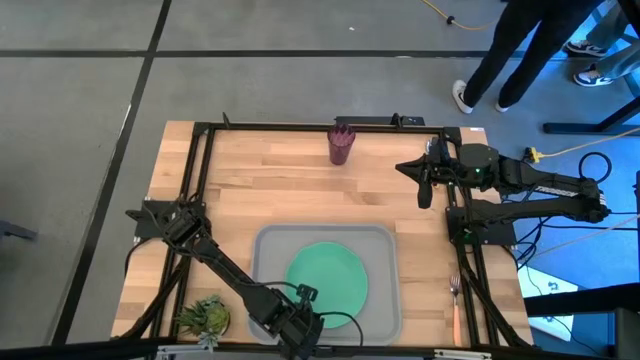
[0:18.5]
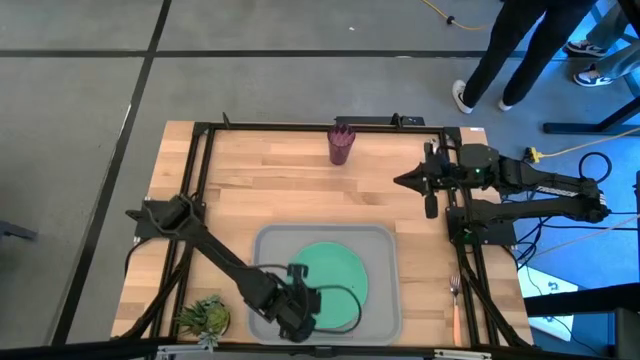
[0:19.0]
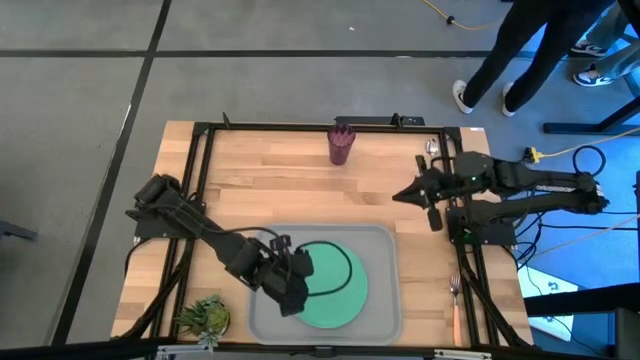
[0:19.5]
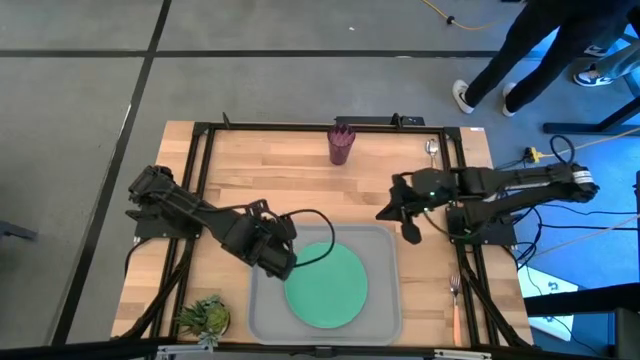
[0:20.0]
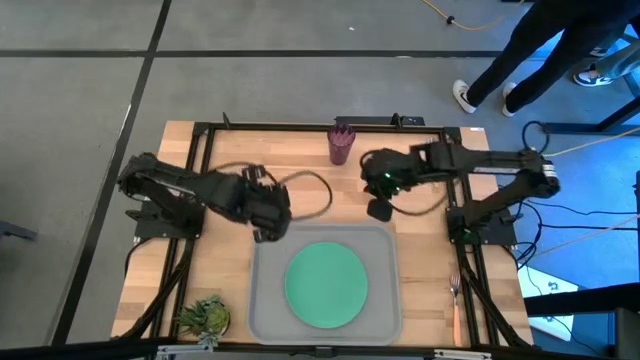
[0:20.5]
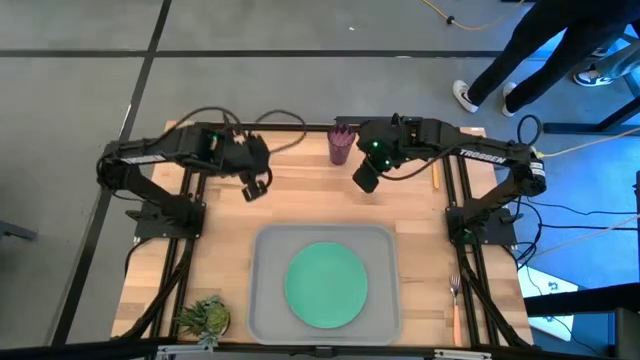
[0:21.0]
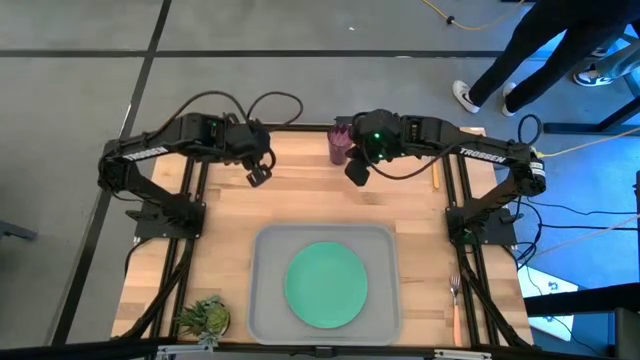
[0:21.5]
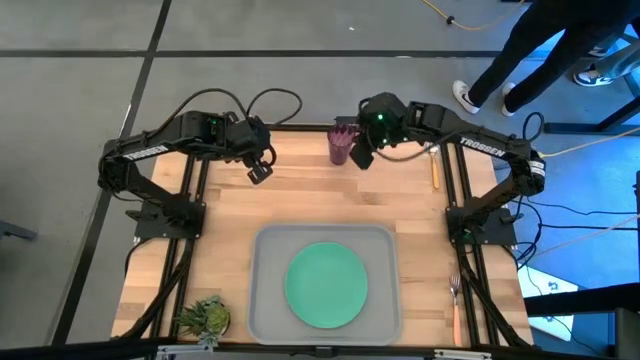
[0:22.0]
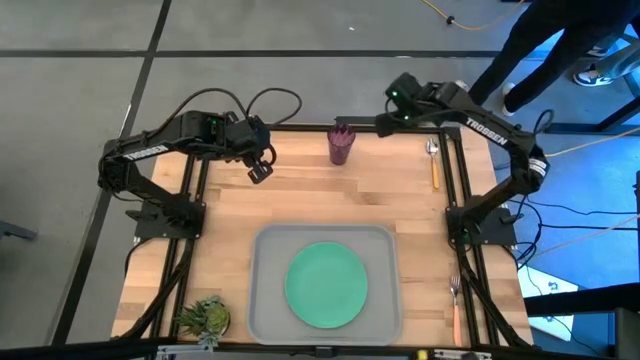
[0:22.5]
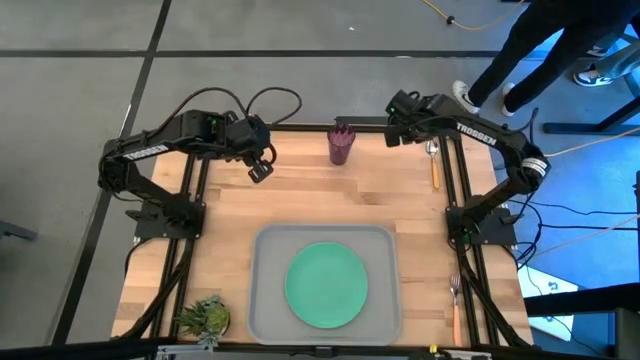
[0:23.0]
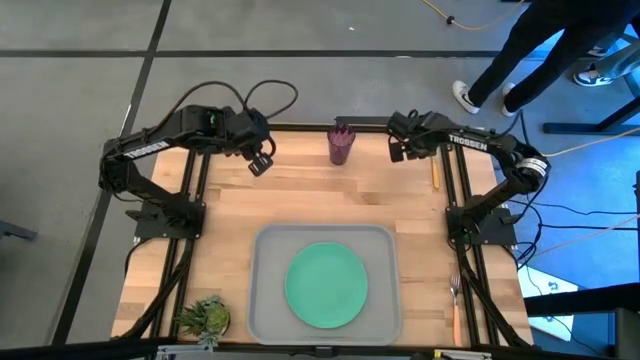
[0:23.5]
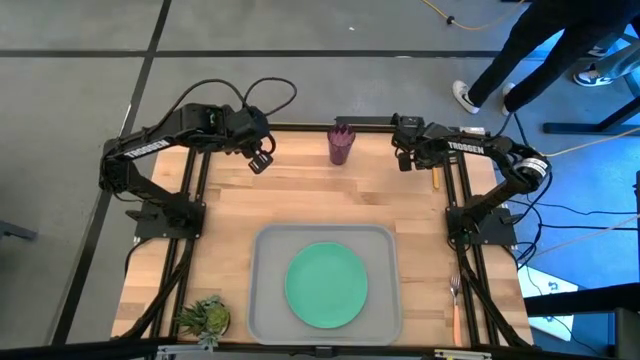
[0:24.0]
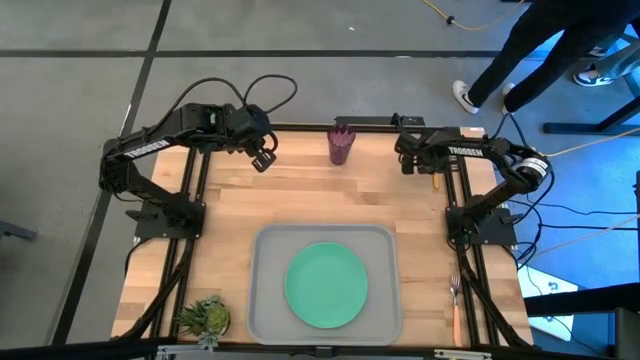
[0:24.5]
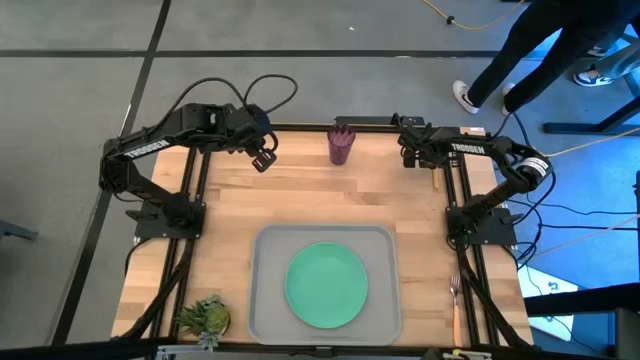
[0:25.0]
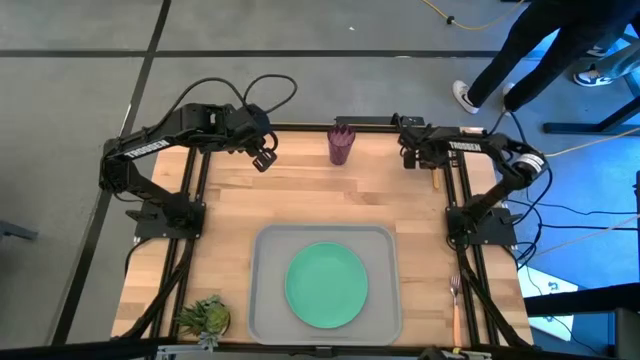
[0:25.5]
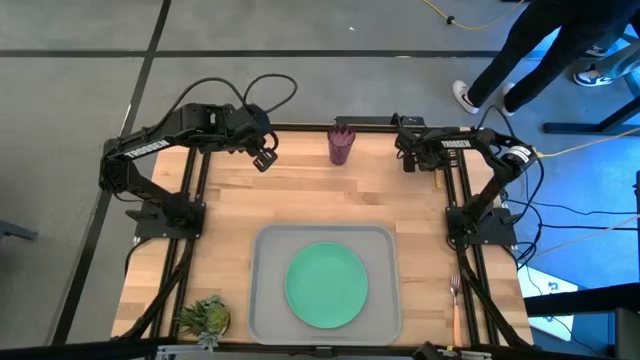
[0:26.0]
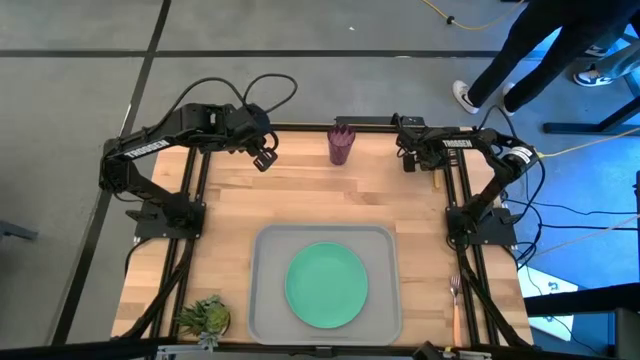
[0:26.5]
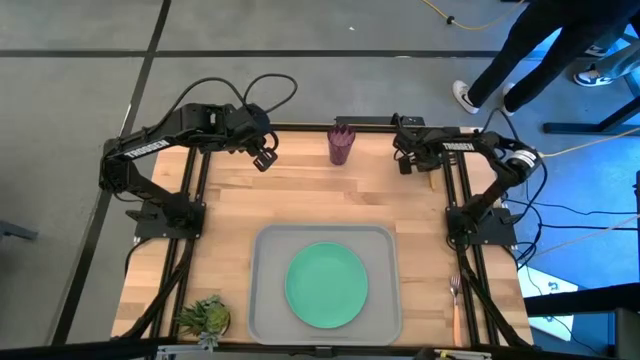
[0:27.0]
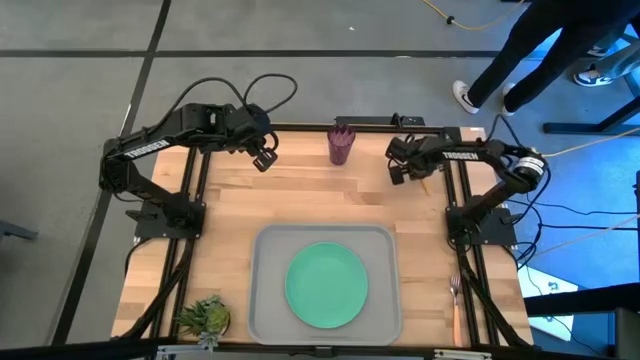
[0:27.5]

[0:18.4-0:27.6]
Task: Pick and place plate/cup/fork/spoon on tray
Put the orange spoon on the gray tray to the right of the green plate

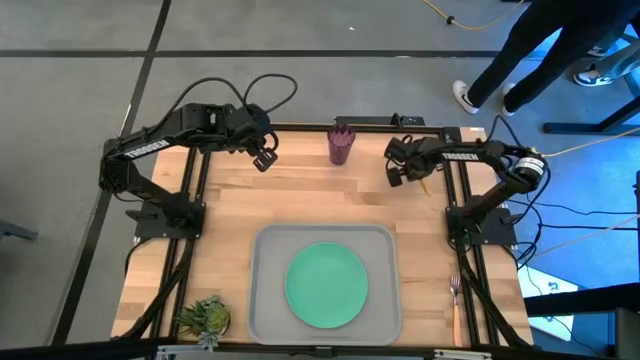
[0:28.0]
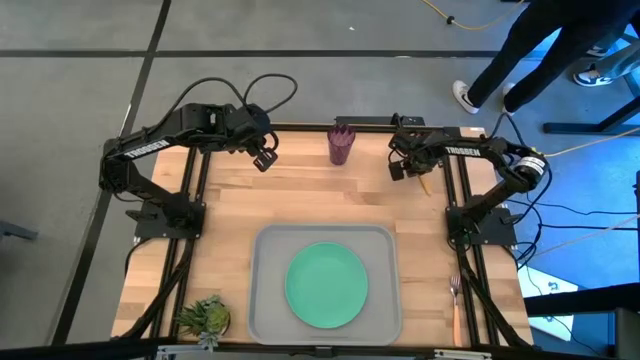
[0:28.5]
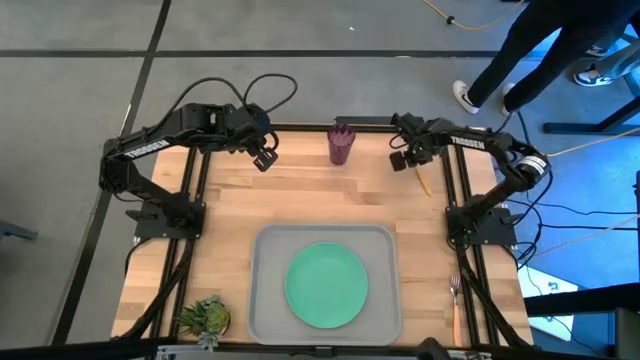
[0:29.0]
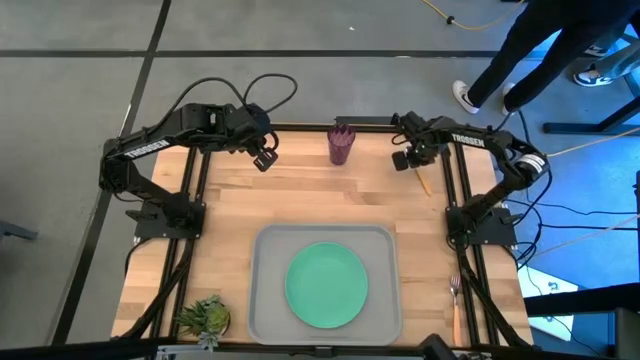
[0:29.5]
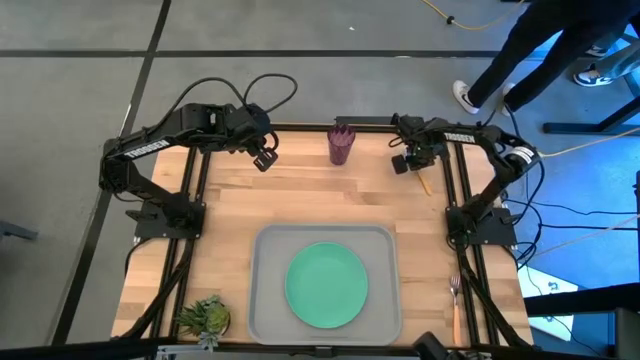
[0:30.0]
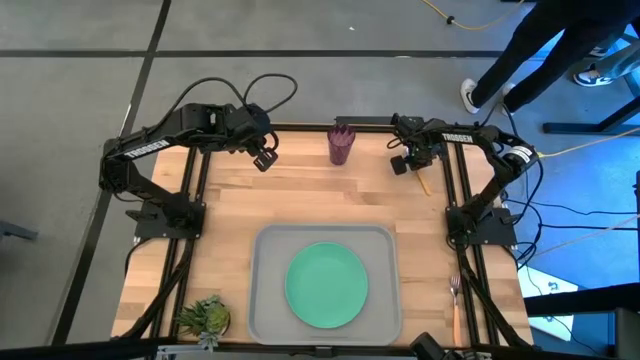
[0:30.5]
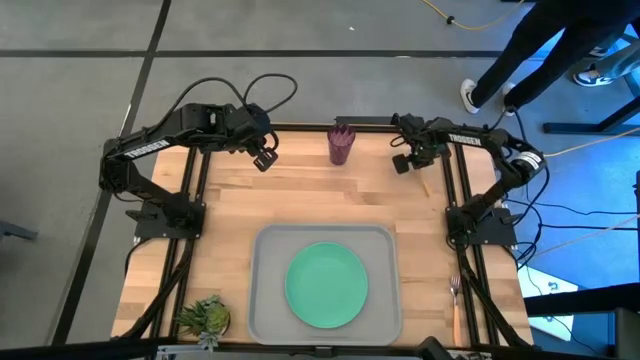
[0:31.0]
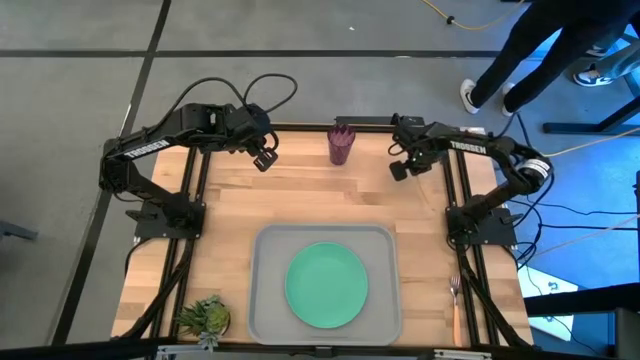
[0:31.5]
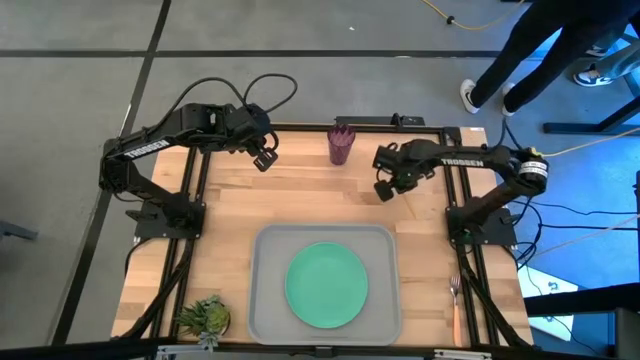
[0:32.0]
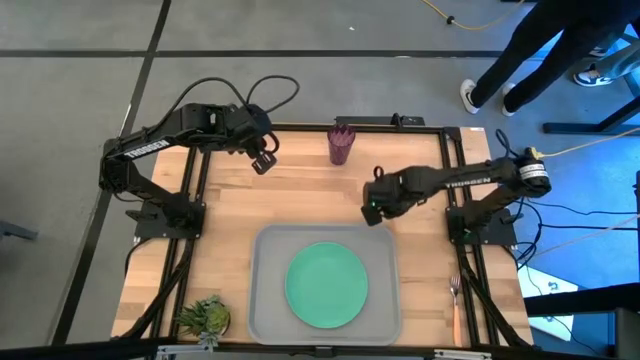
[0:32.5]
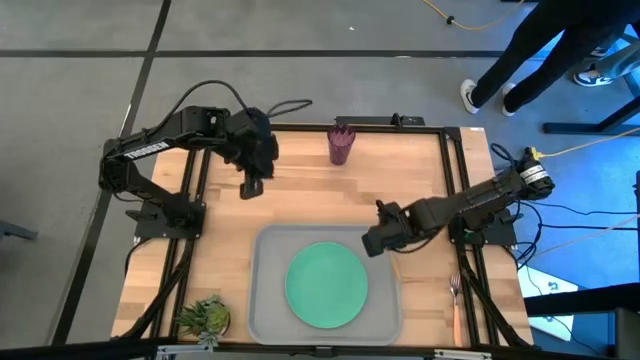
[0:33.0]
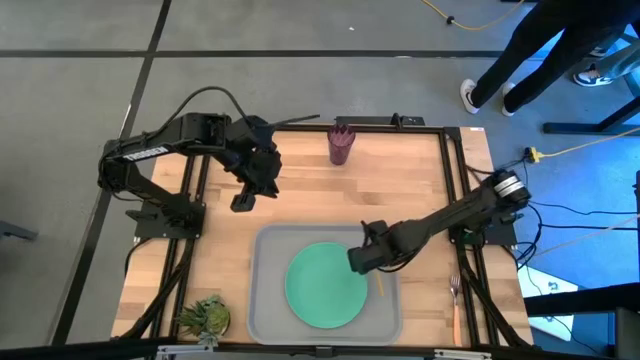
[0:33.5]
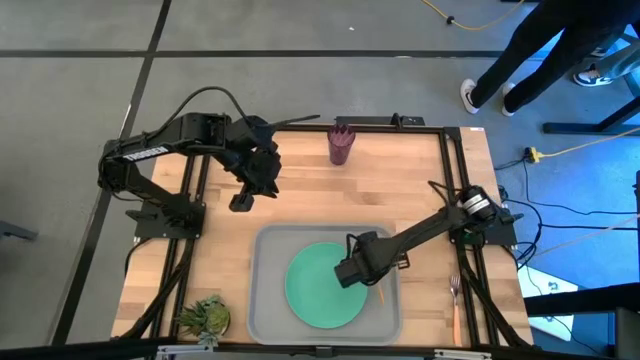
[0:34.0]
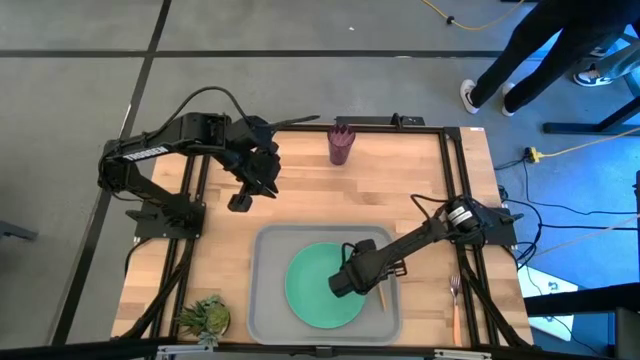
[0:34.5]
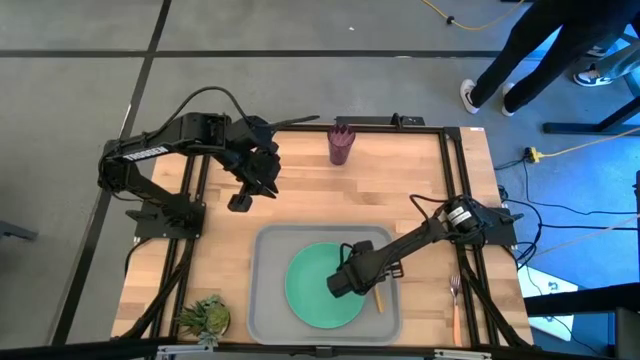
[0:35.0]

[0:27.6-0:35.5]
Put the orange spoon on the gray tray to the right of the green plate

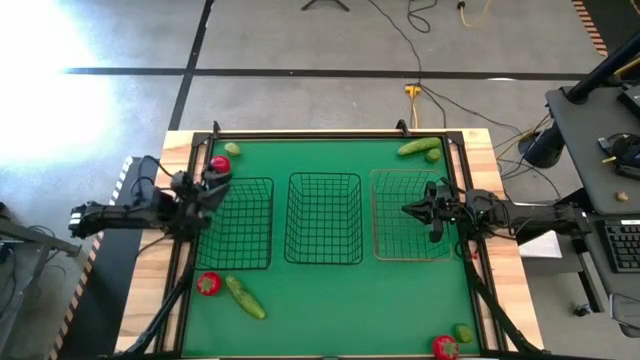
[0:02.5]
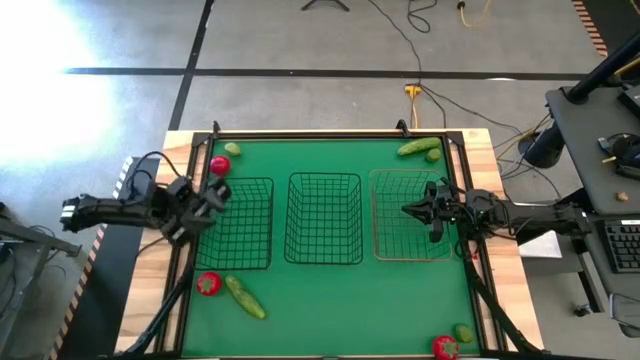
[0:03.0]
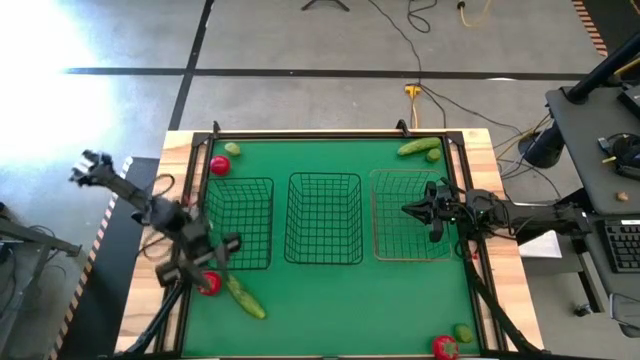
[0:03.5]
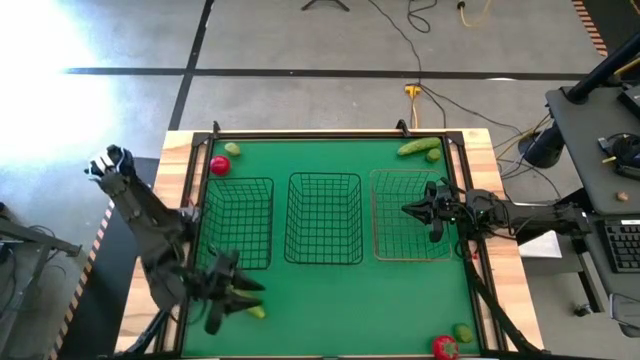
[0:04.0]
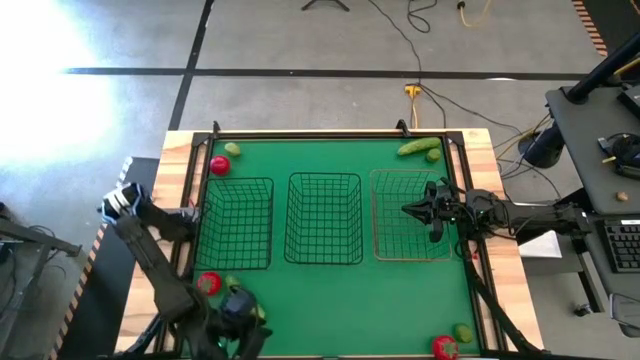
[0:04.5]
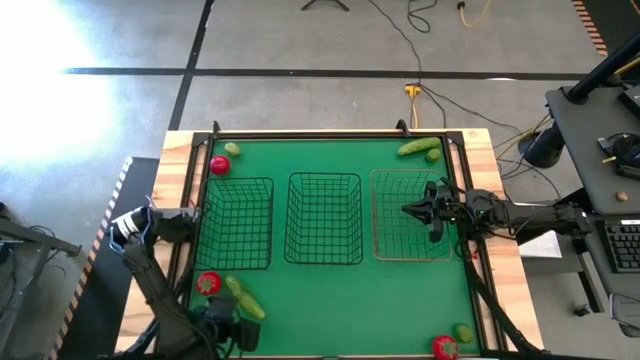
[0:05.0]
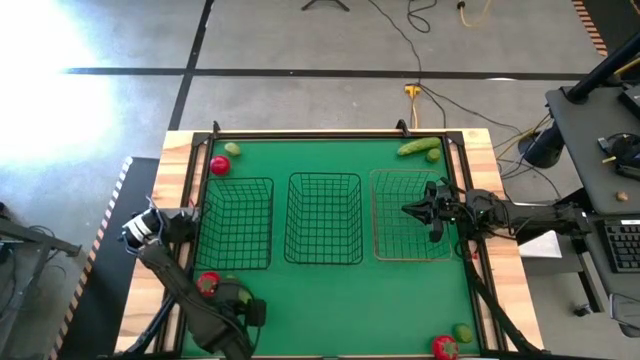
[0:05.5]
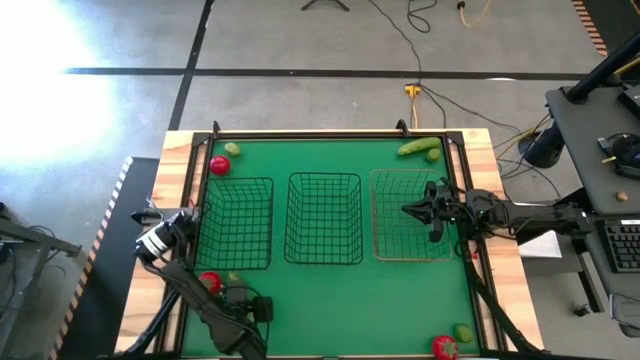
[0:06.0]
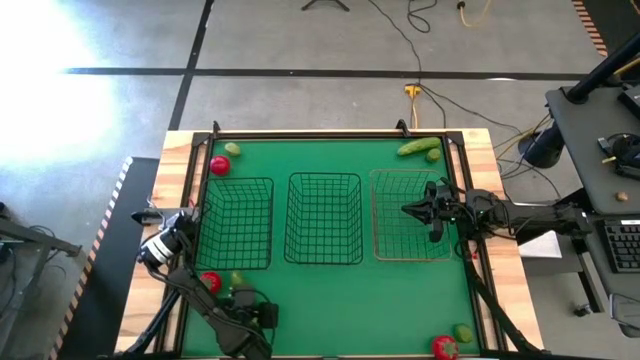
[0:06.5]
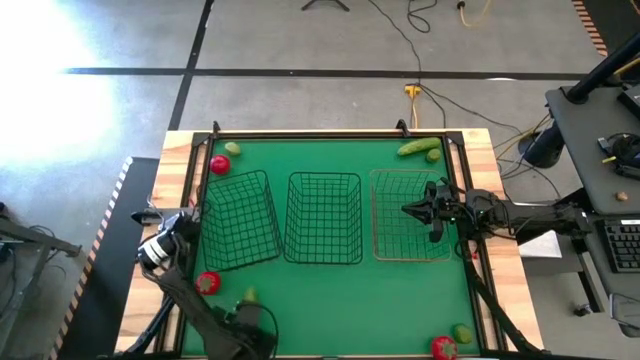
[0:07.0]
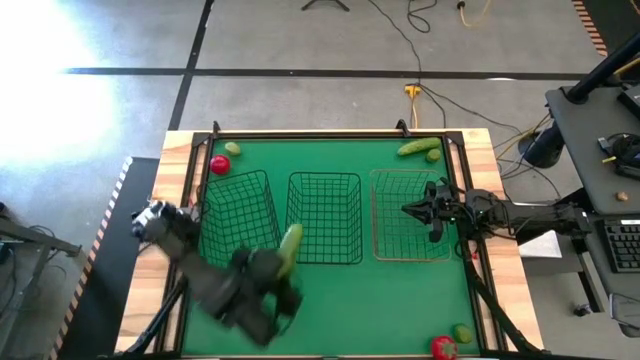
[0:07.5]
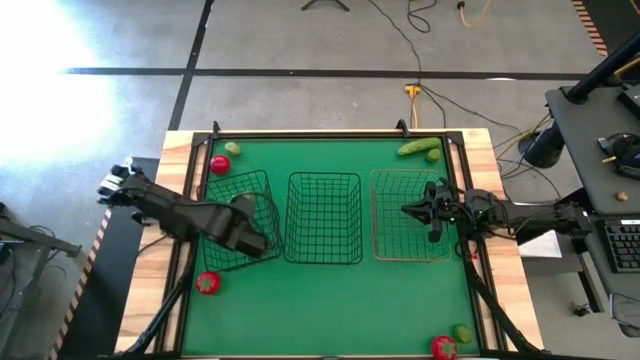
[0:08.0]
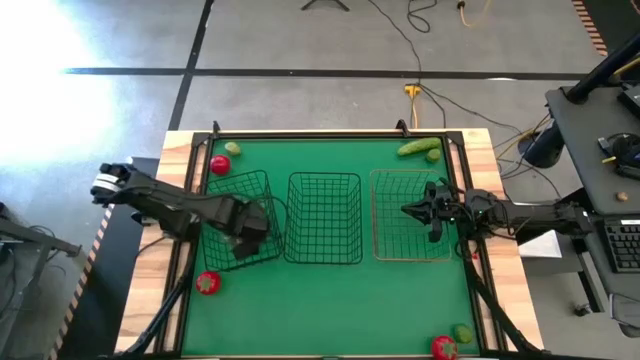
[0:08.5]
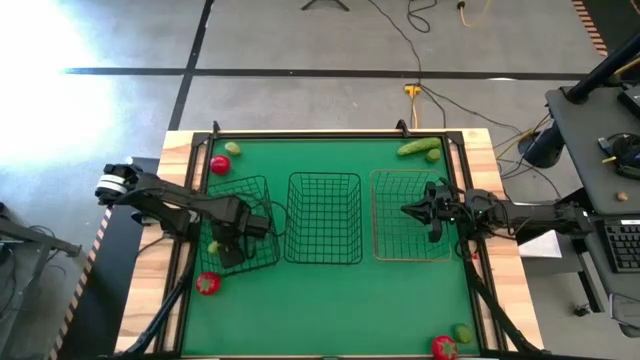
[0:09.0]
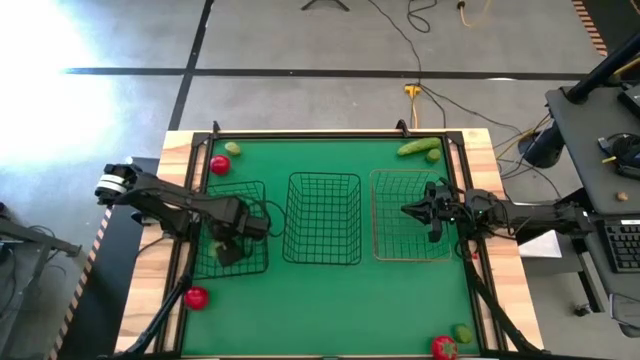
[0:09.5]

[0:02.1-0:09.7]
Task: Sort produce into baskets
Put the bottom cucumber into the left black wire basket
